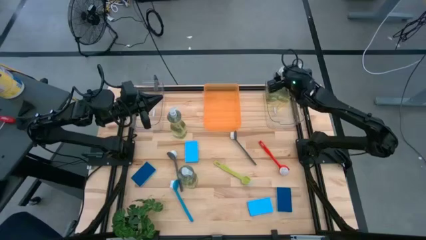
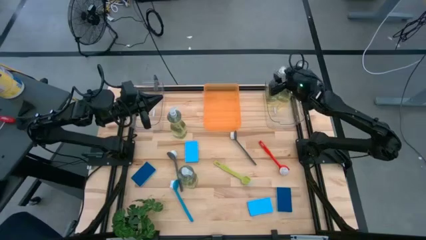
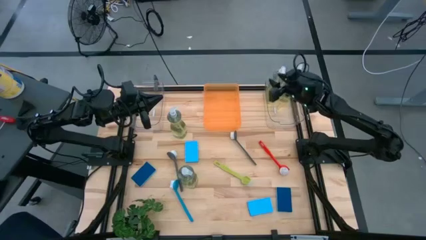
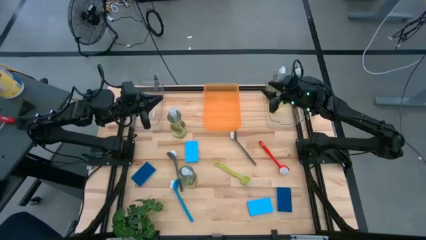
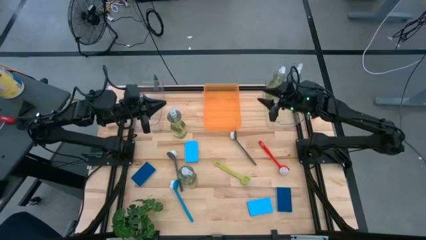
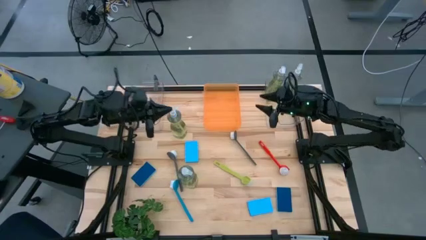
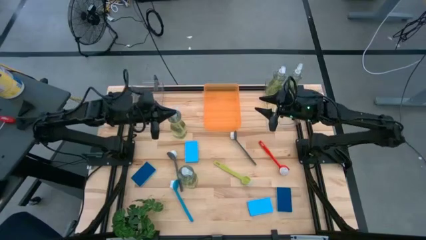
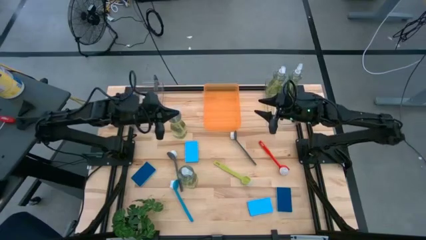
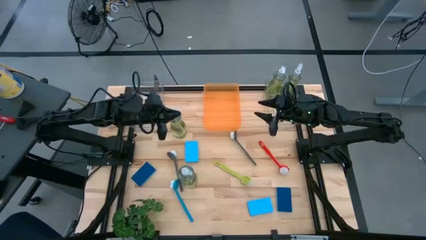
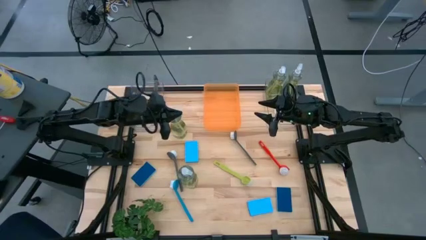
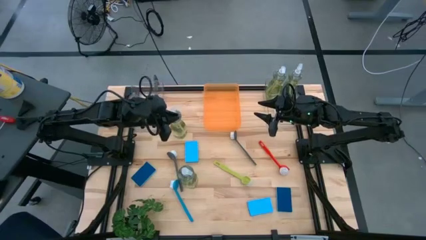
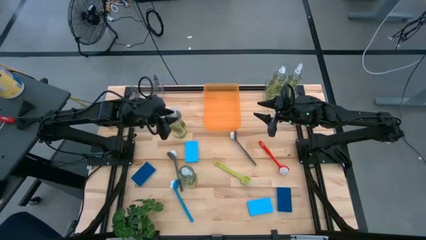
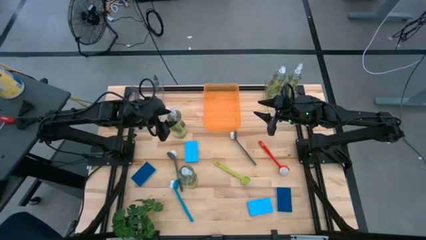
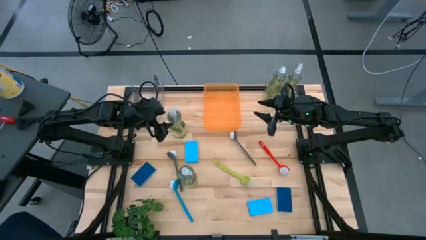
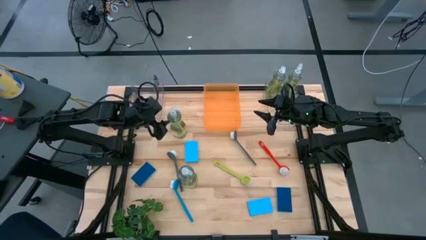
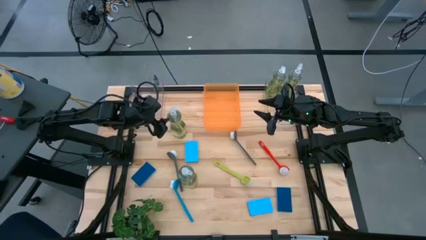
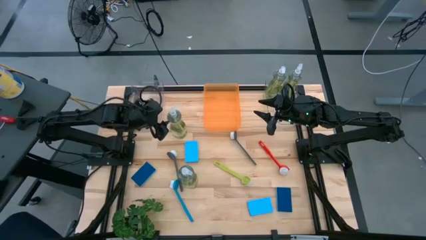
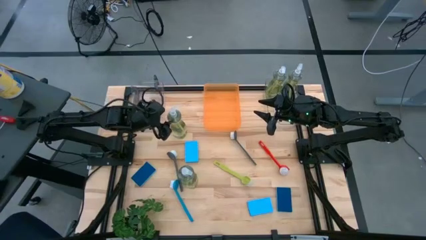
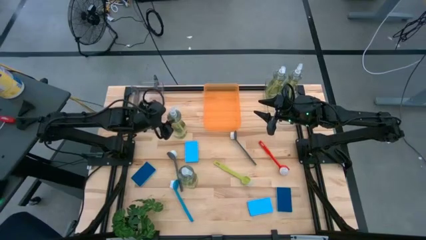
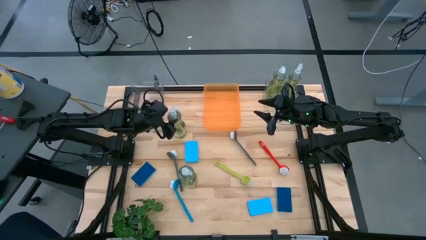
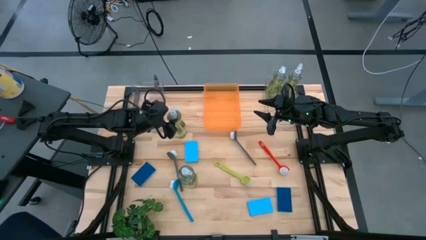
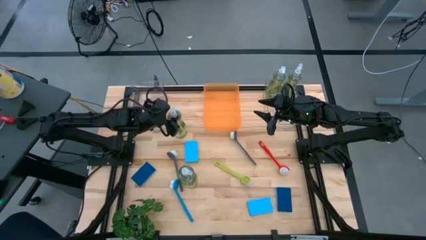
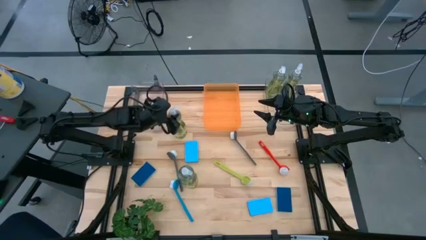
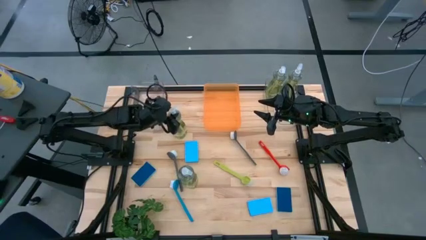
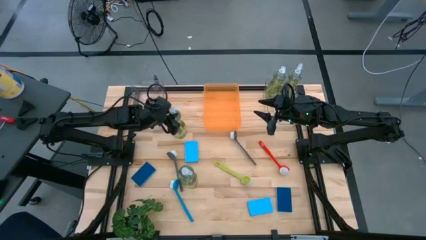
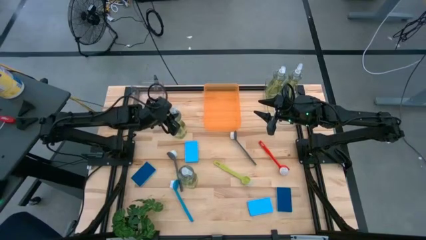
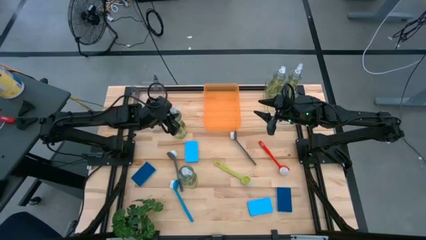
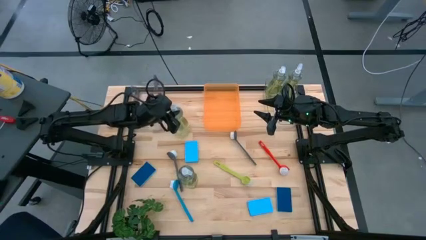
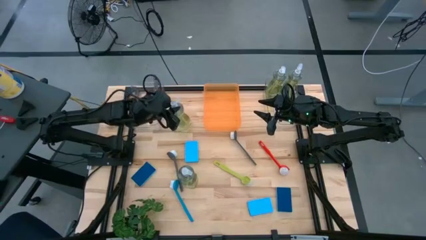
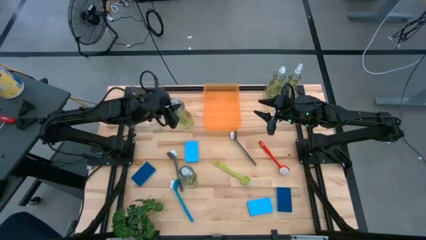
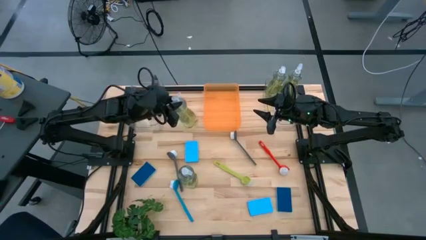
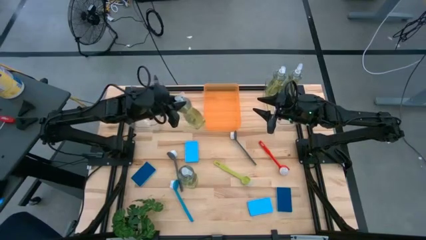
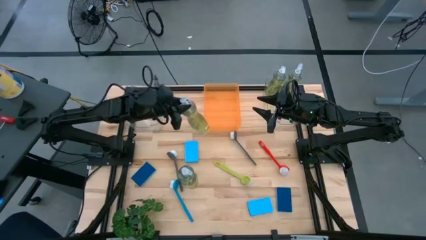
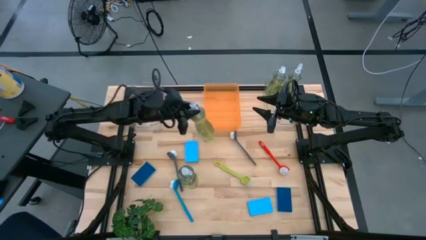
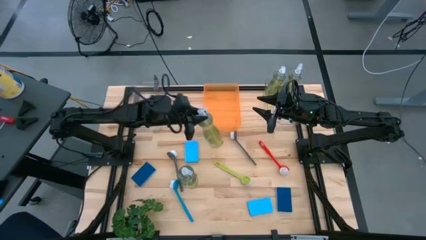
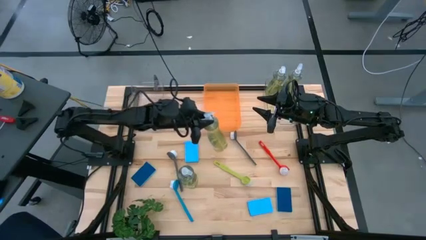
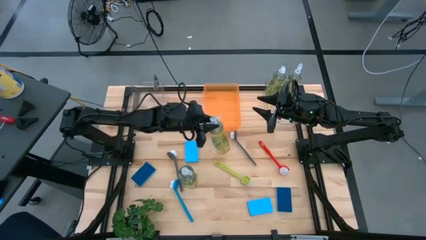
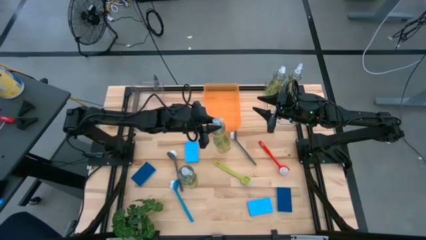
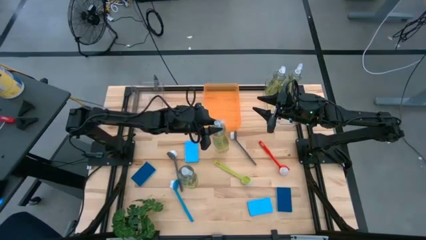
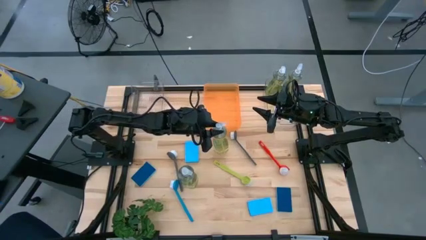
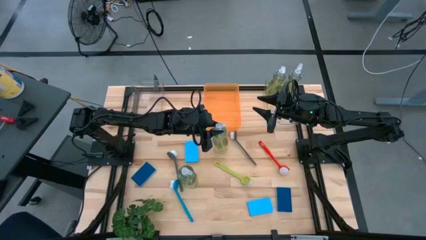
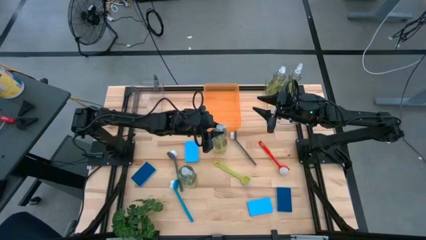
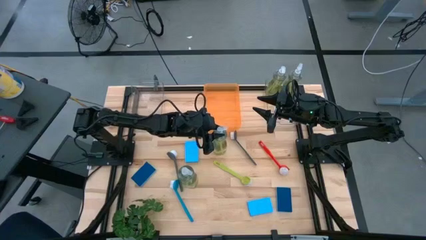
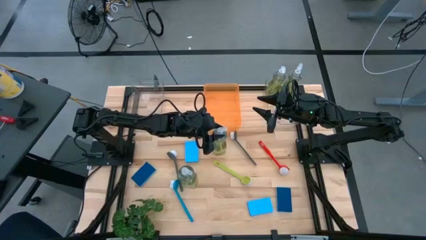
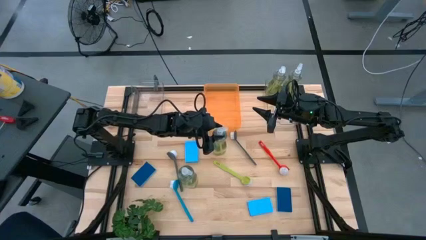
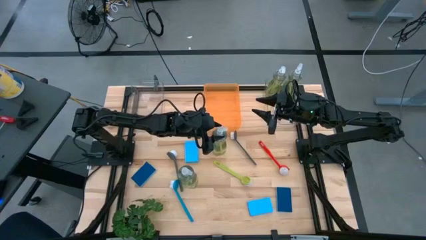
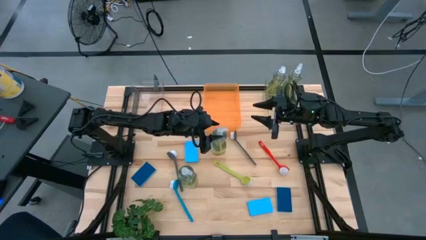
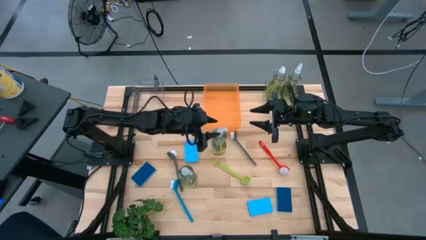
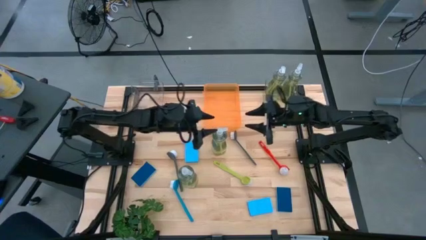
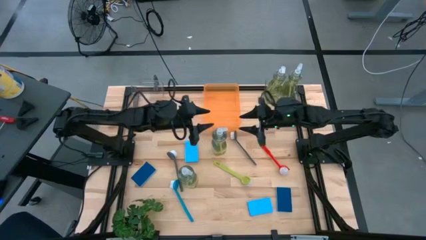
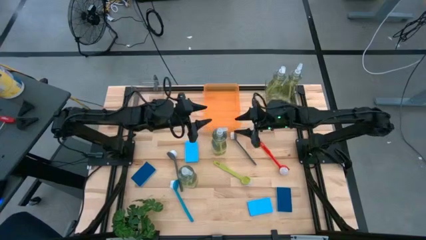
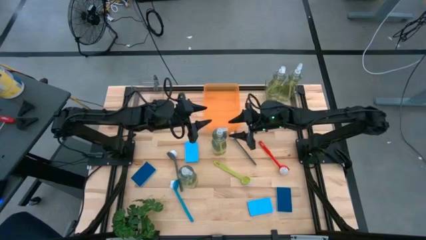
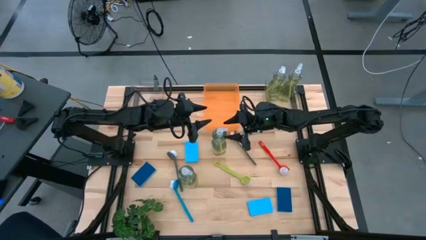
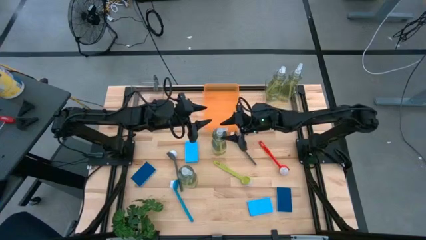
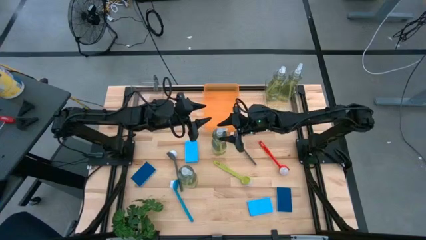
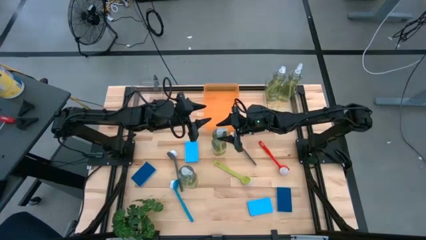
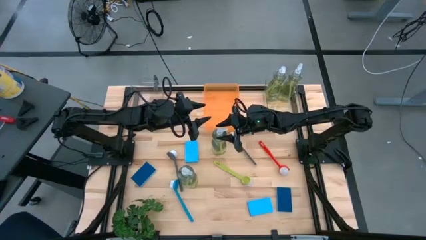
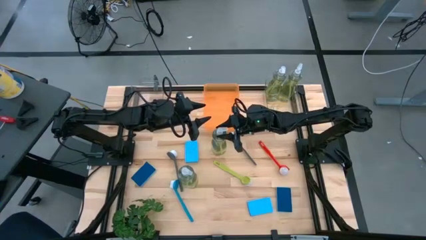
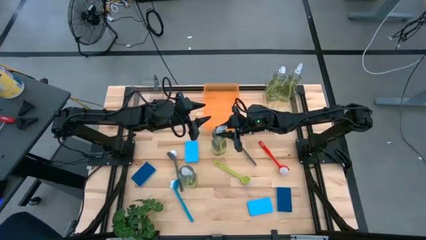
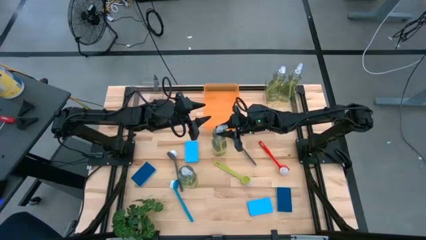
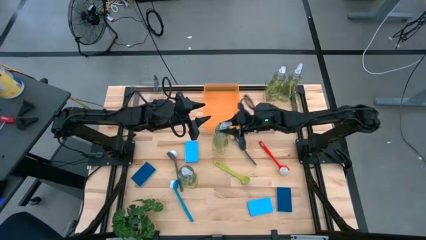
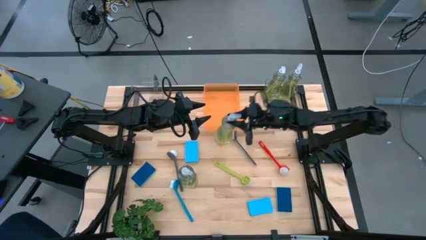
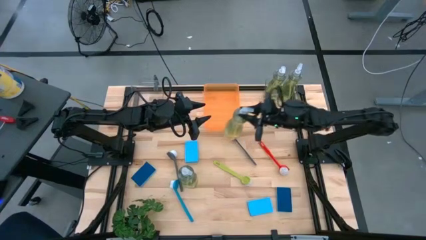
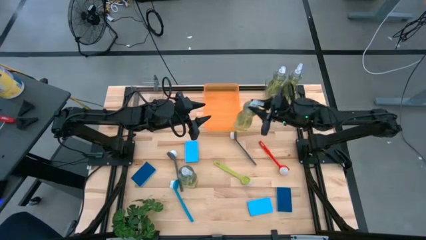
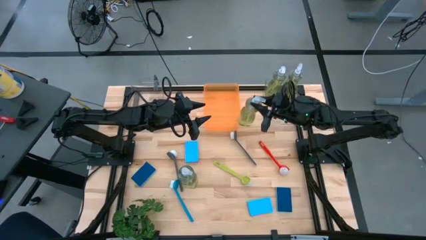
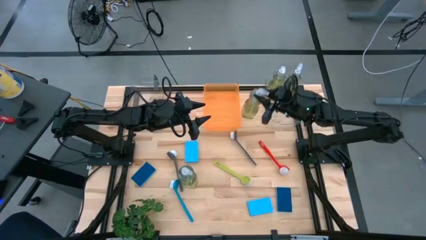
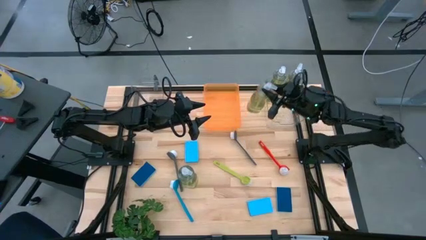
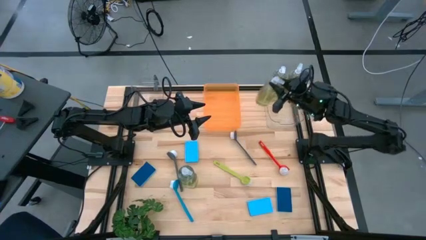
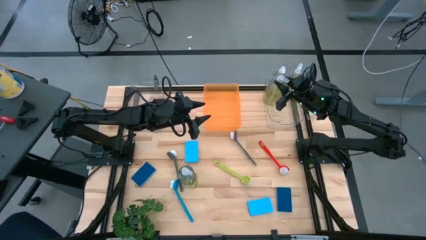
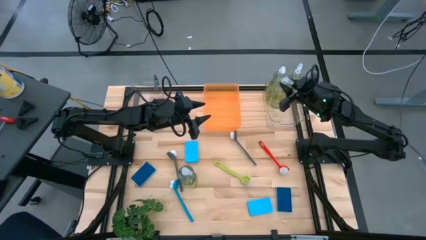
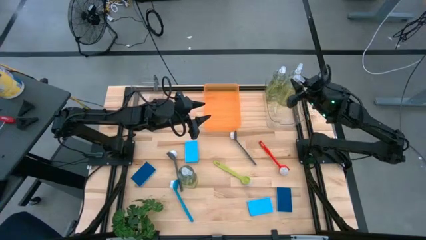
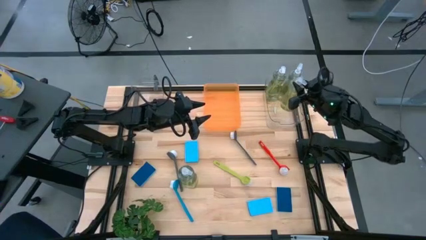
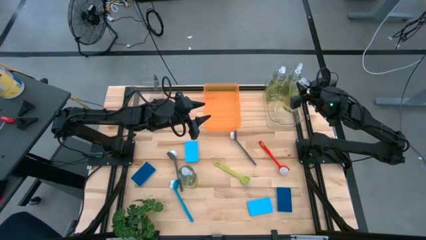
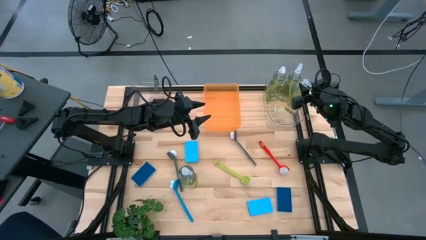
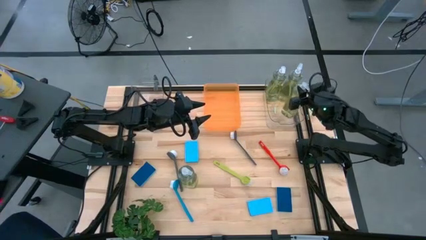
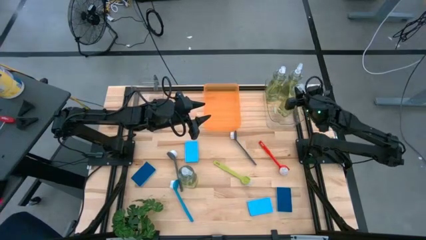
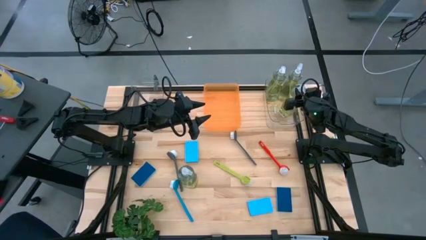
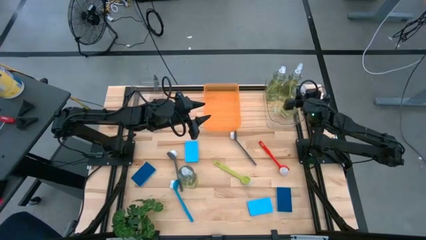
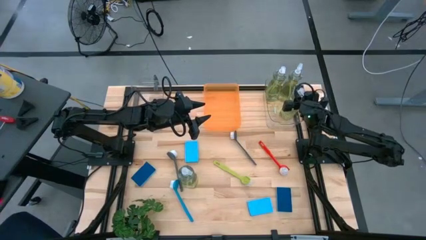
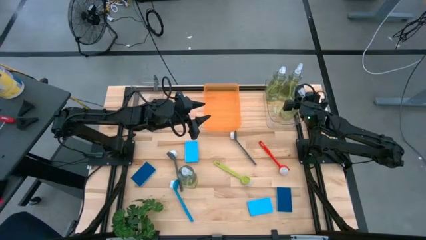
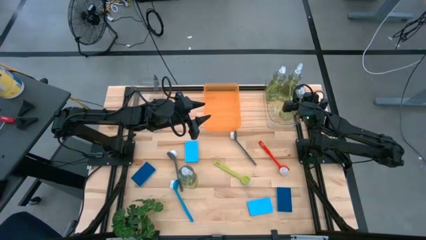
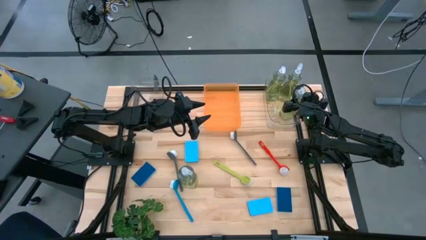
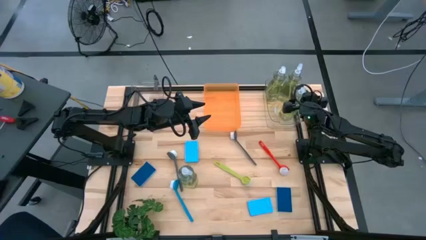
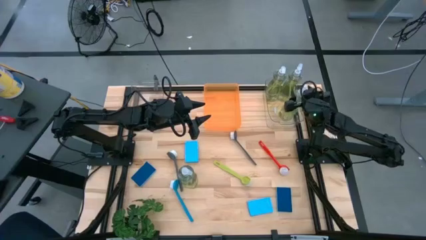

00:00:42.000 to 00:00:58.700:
Task: Pick & Place Kitchen Sink Supplies
Put the yellow dish soap into the right transparent bin

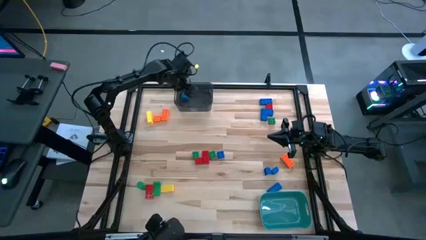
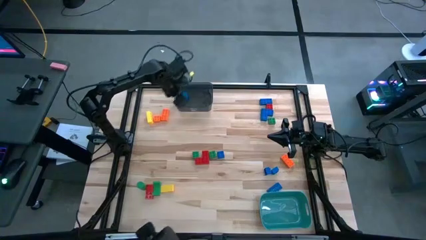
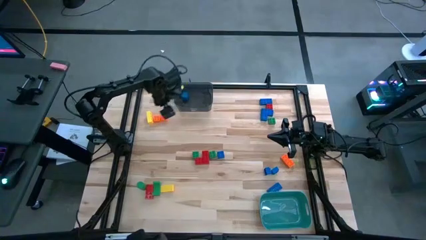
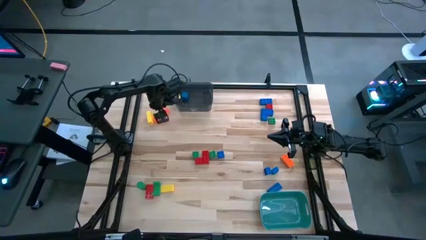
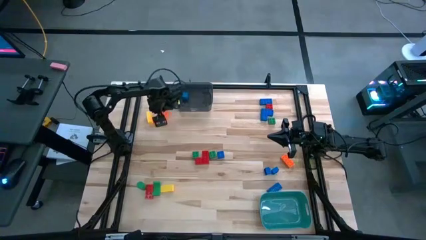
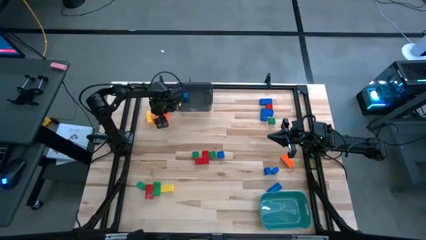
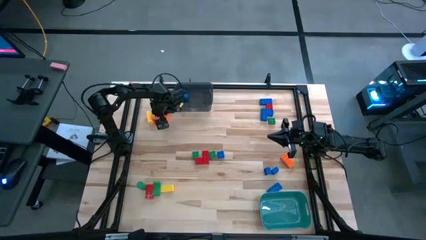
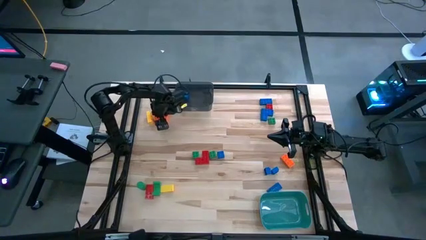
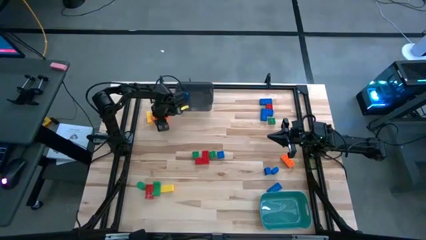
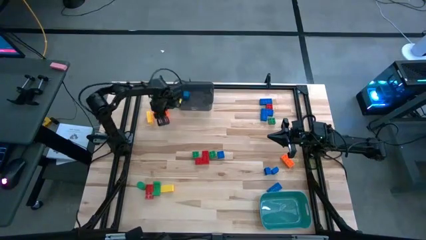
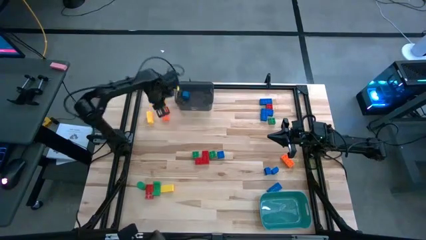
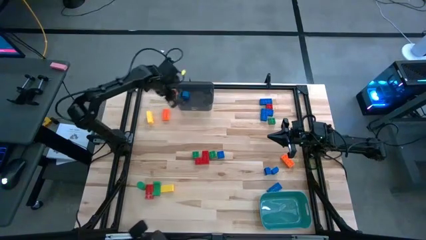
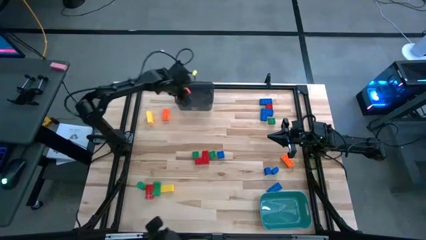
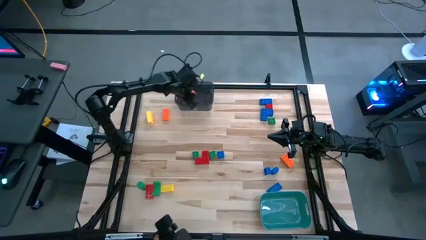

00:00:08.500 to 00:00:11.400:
Task: Sort blocks by size
Put the orange game piece into the black bin
